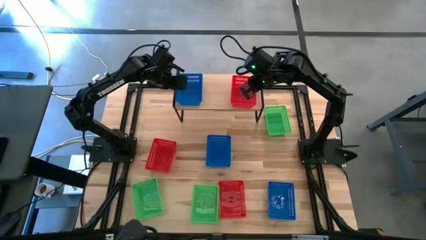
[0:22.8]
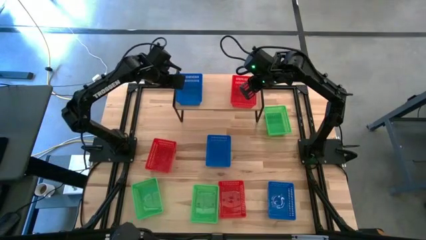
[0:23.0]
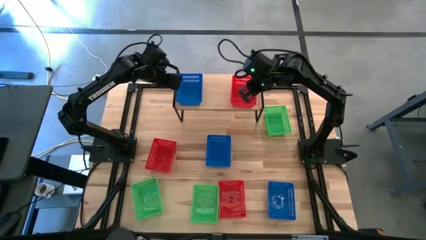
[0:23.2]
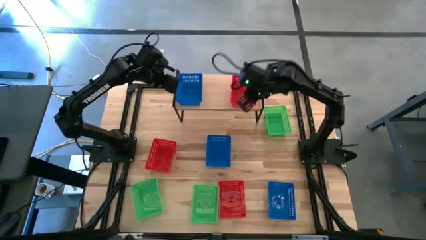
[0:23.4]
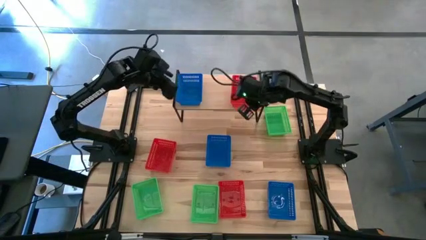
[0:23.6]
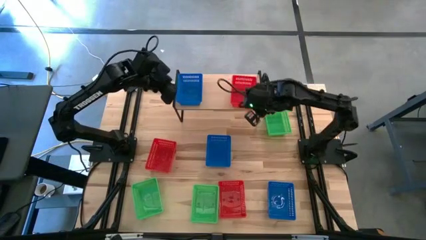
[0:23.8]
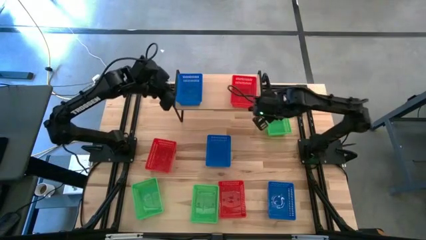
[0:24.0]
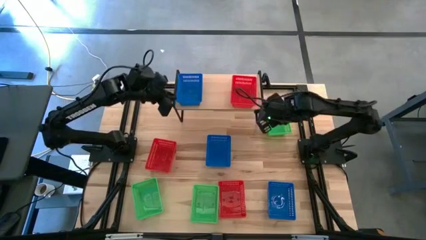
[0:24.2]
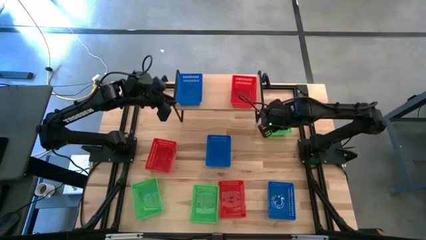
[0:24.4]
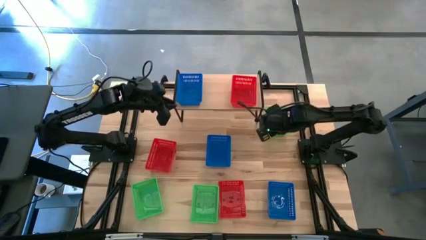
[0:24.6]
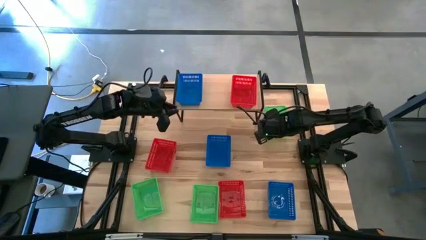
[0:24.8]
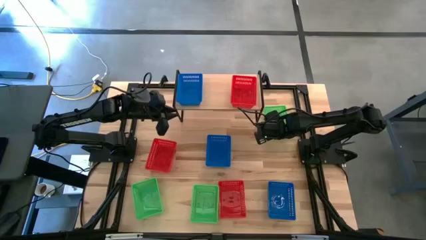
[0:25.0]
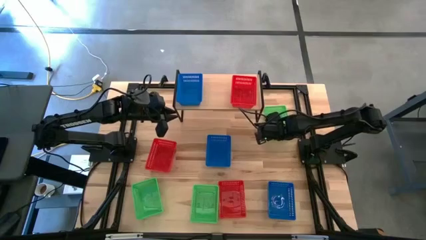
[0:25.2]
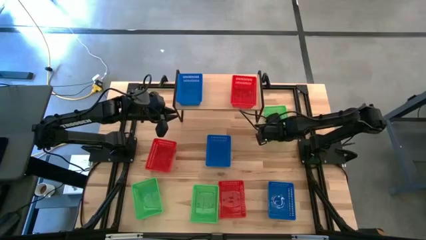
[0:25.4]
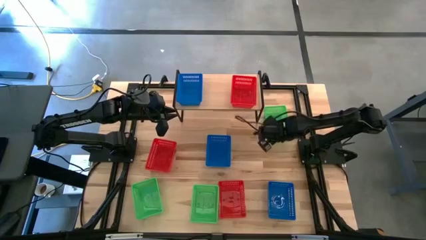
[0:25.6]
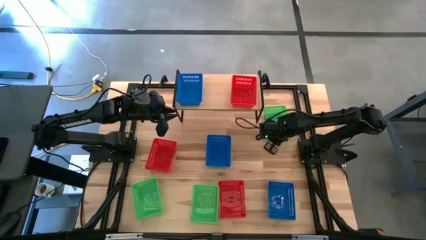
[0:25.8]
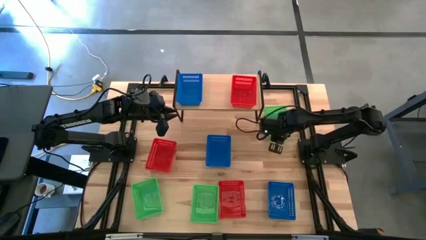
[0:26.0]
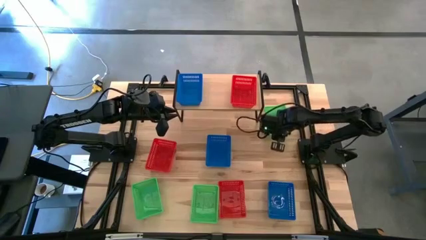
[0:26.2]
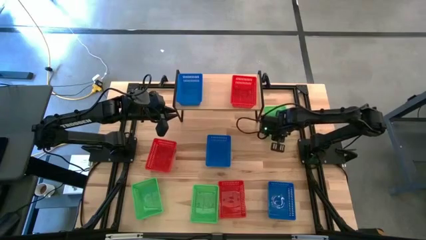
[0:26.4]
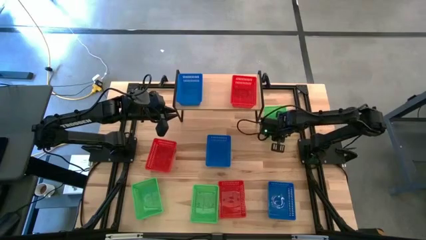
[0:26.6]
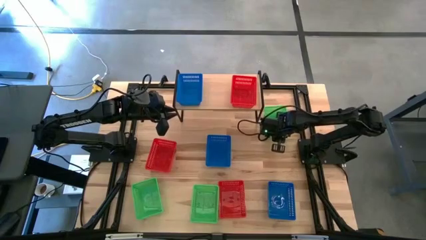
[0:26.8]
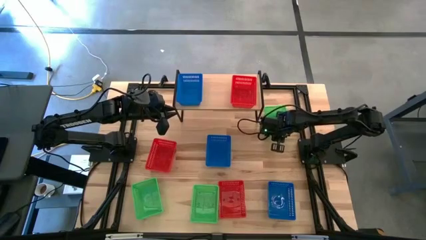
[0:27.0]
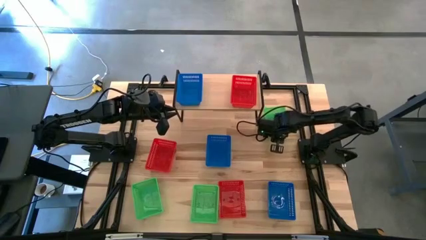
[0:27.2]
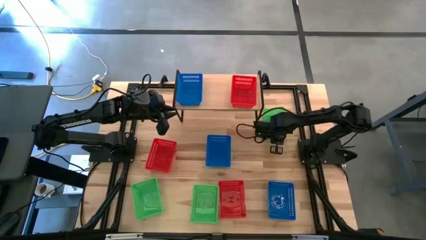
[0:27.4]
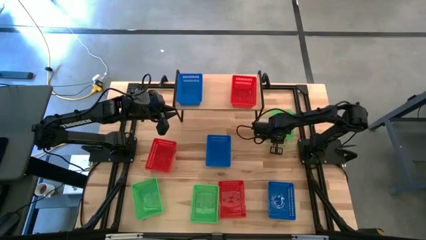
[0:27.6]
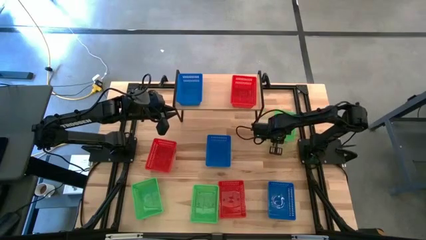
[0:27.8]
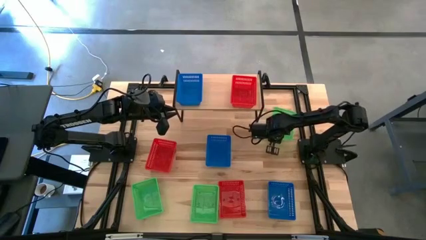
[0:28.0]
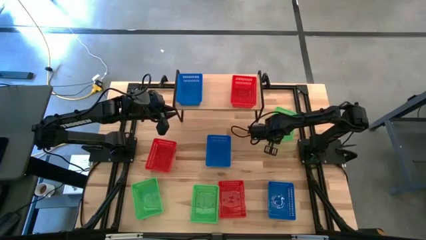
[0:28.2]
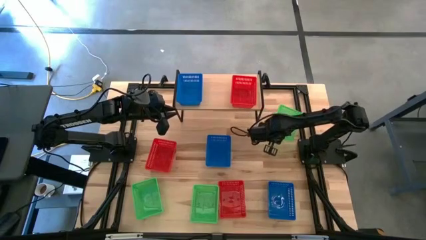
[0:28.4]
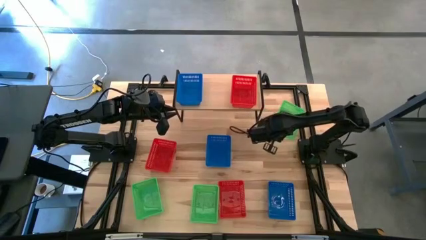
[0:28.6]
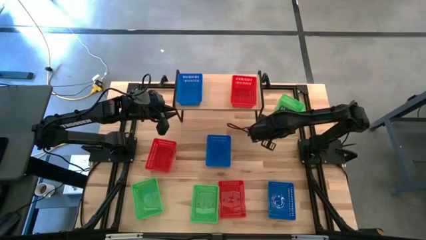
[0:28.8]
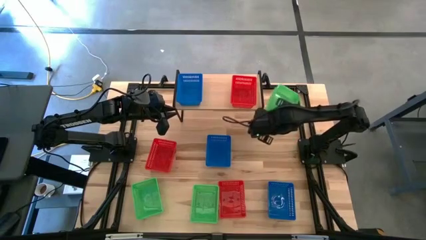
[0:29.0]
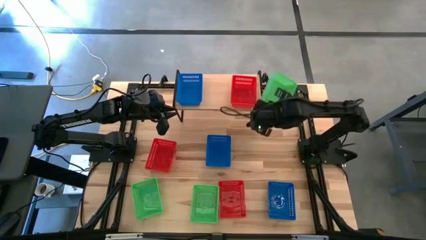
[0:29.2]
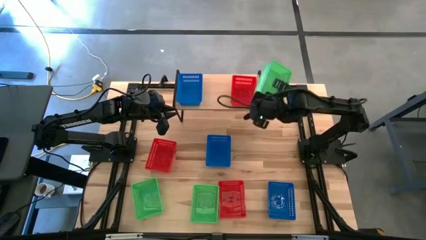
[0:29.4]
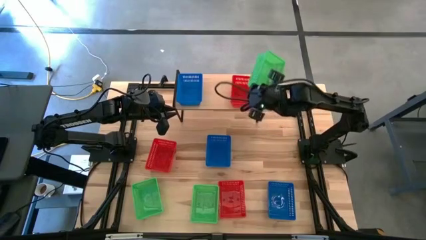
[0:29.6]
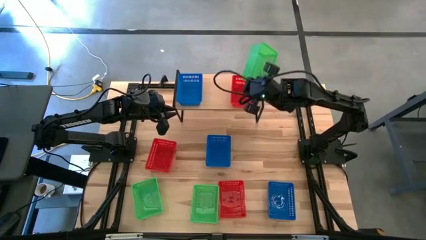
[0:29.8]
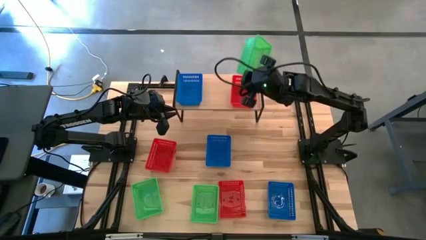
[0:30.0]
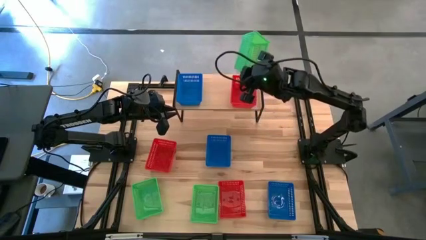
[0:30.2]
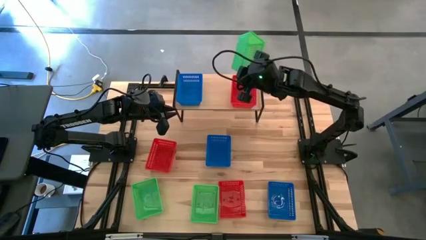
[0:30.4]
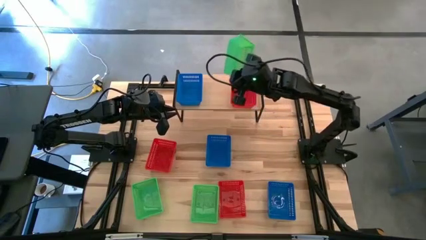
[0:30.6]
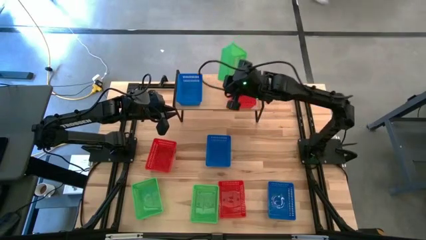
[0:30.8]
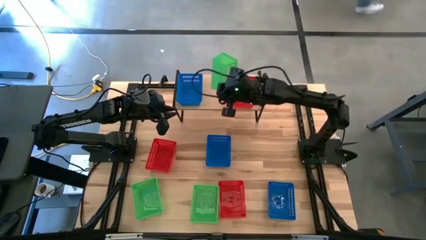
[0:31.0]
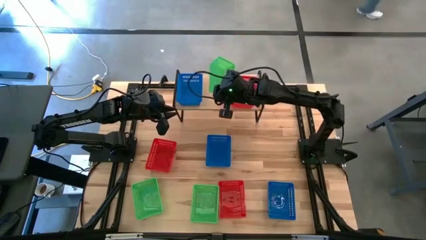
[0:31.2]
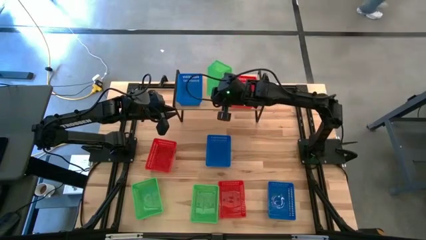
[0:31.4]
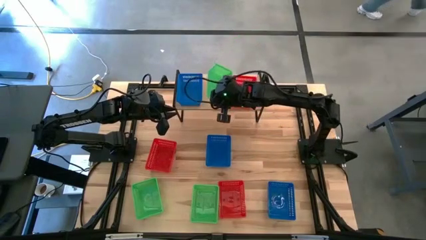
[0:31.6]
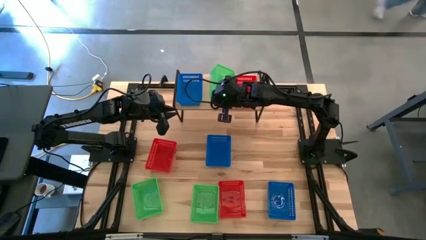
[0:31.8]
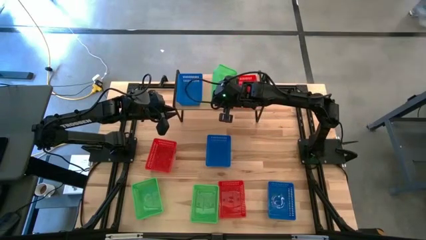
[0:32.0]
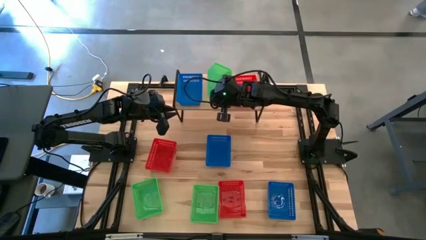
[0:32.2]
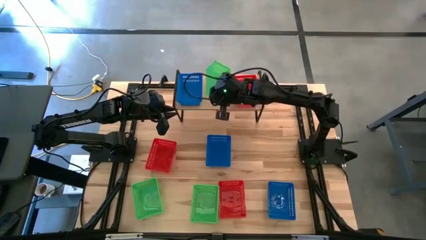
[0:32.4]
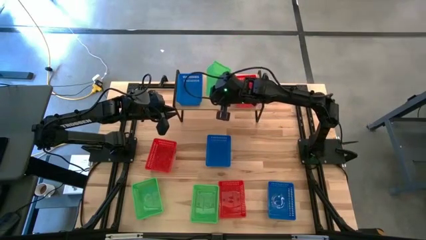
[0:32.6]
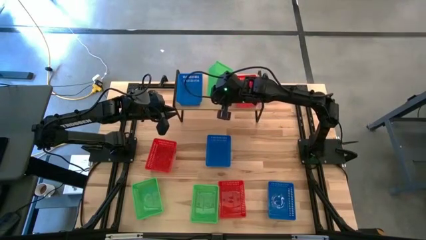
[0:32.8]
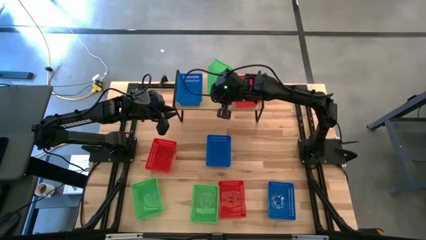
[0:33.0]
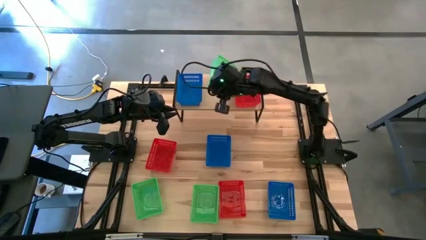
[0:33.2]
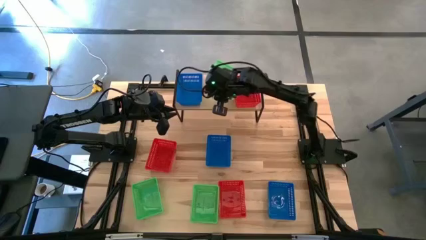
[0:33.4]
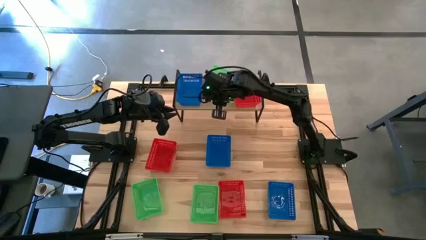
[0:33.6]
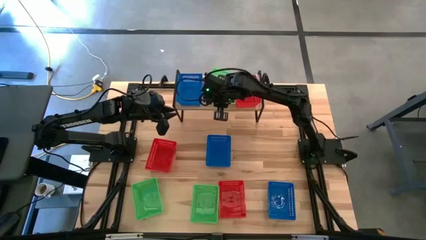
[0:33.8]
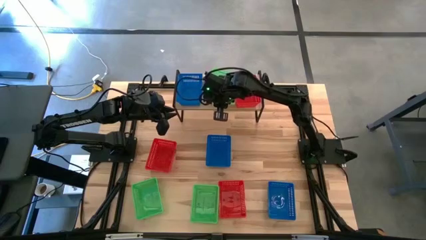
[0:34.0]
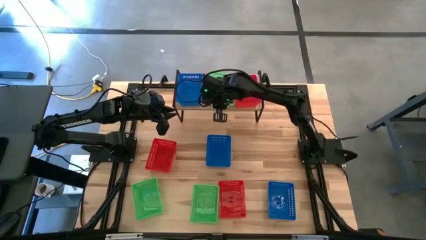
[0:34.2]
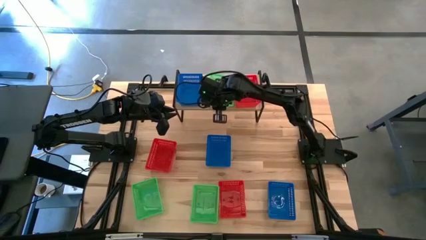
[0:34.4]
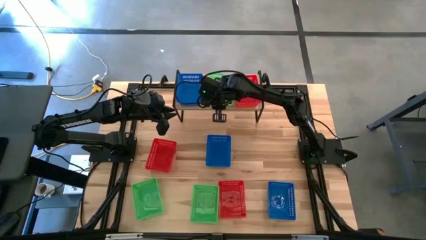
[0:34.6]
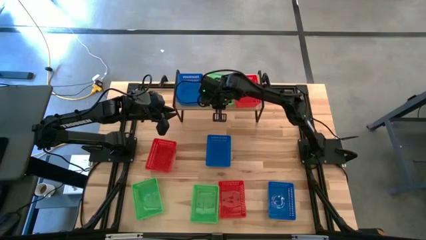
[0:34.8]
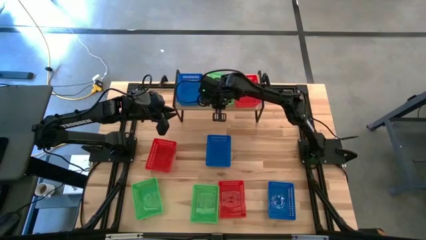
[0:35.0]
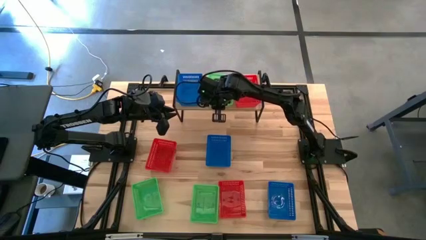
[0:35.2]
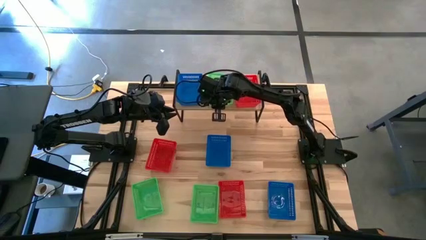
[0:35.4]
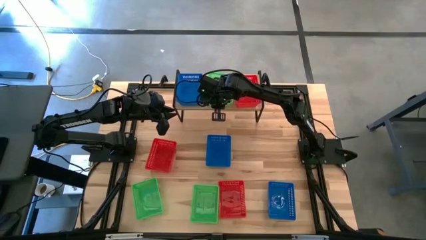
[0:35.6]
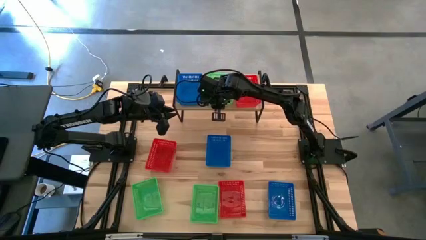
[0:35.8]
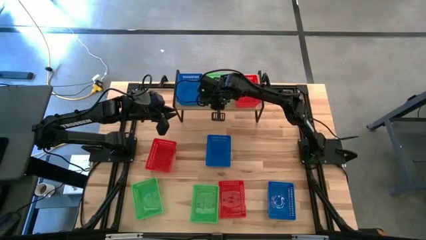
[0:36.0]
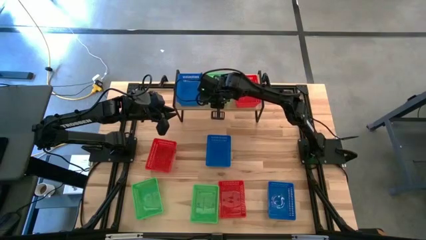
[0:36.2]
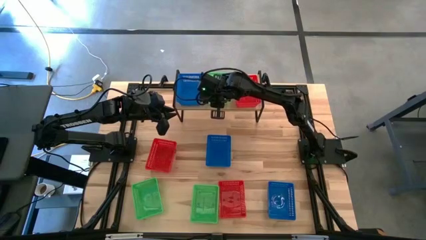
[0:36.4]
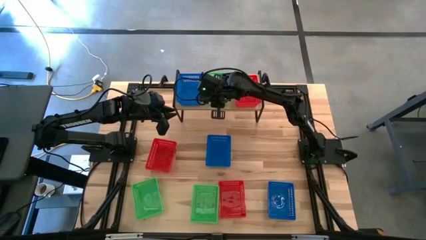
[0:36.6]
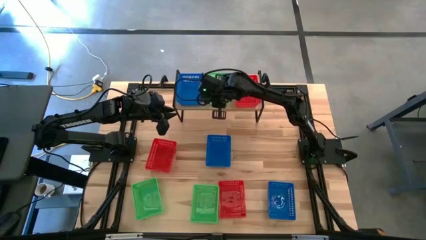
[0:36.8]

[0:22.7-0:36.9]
Task: Stack baskets on shelf by color
Put the top right green bin on the shelf
